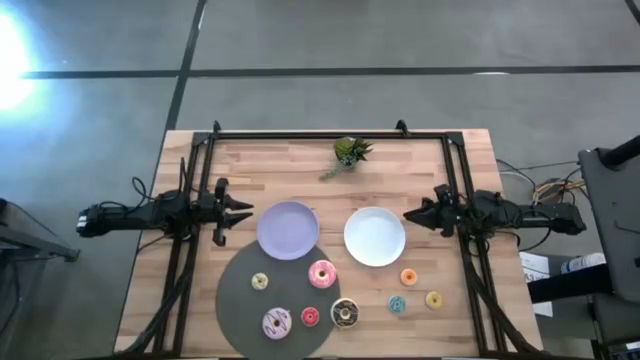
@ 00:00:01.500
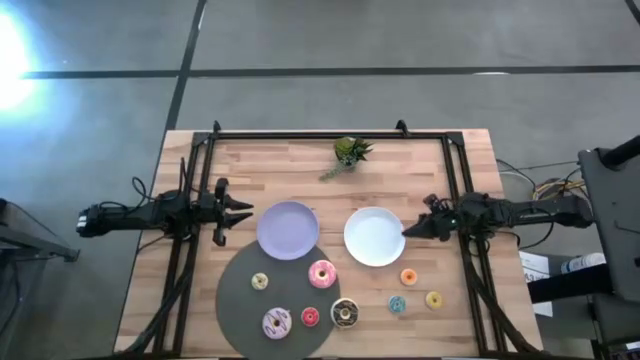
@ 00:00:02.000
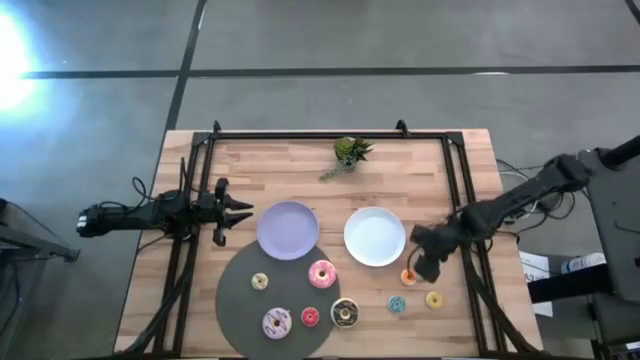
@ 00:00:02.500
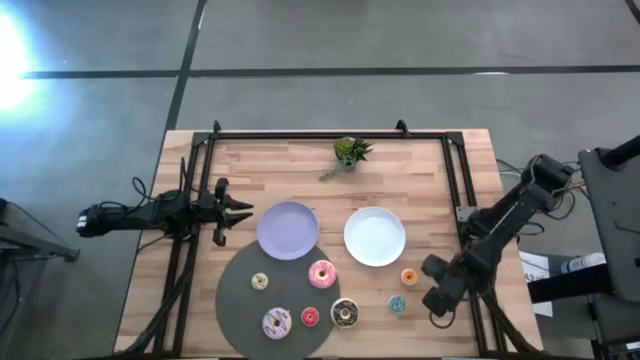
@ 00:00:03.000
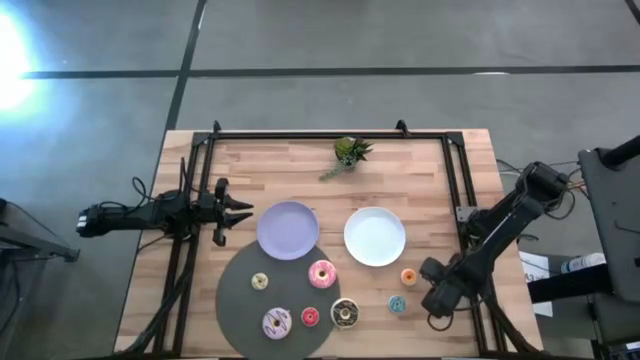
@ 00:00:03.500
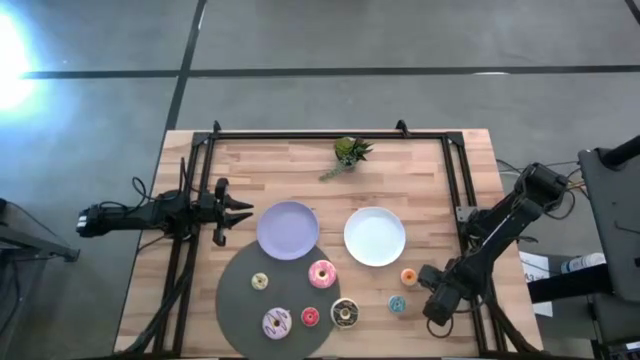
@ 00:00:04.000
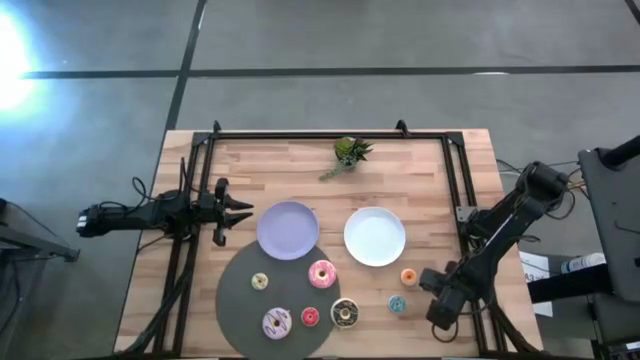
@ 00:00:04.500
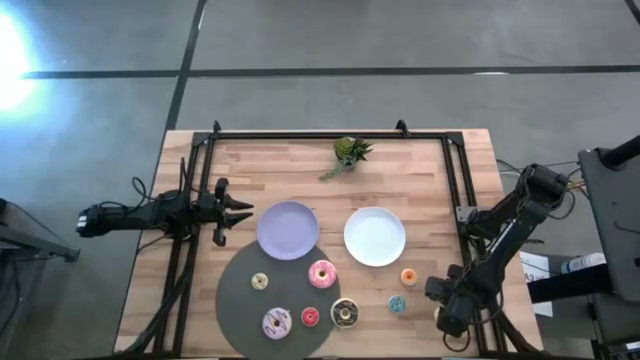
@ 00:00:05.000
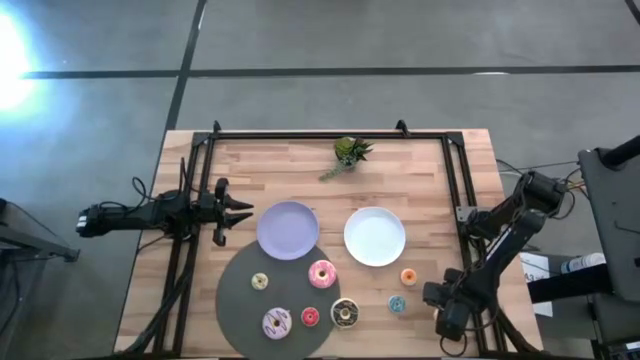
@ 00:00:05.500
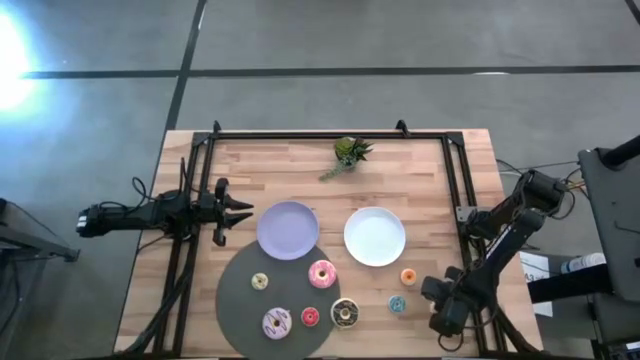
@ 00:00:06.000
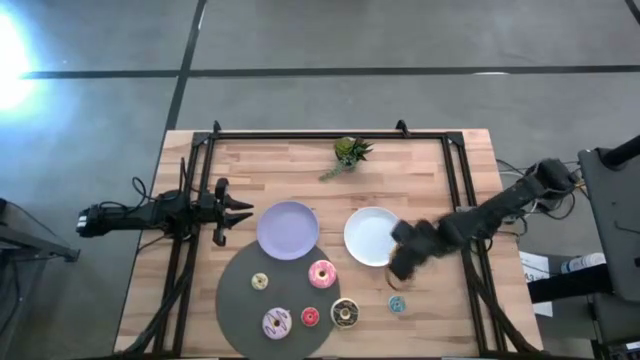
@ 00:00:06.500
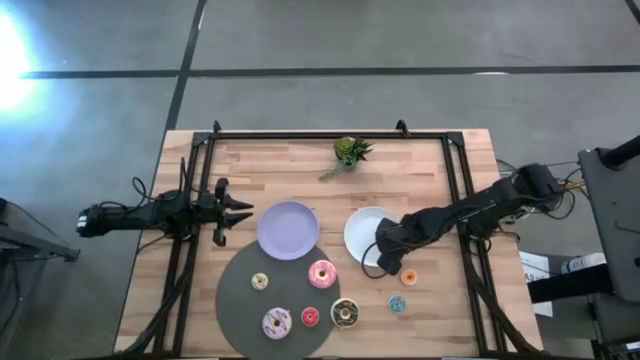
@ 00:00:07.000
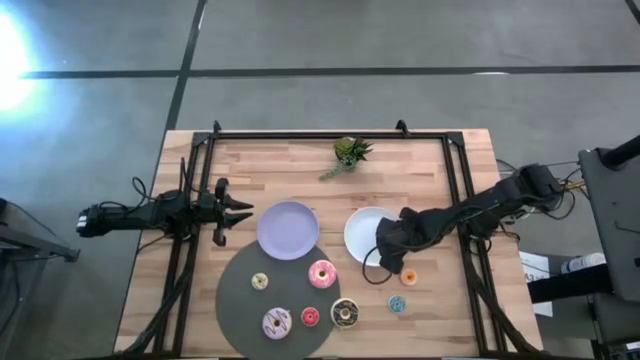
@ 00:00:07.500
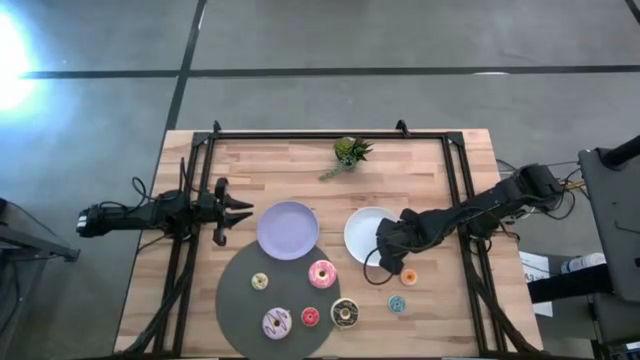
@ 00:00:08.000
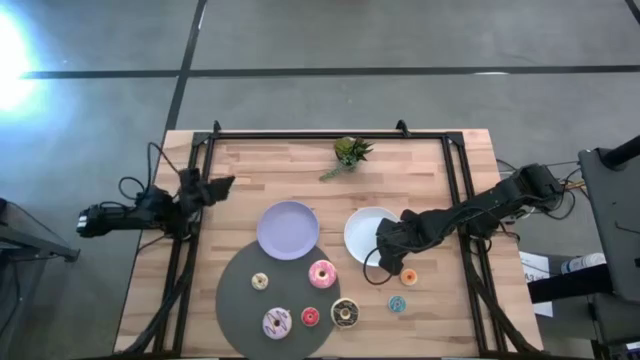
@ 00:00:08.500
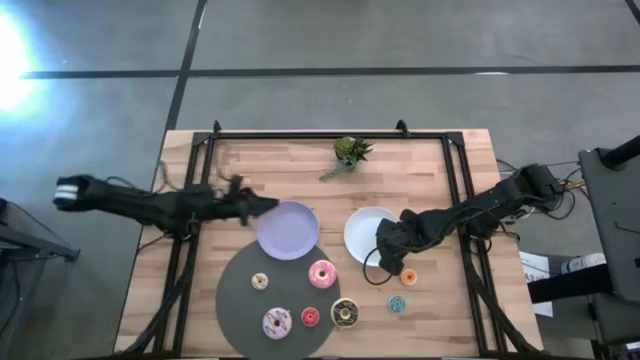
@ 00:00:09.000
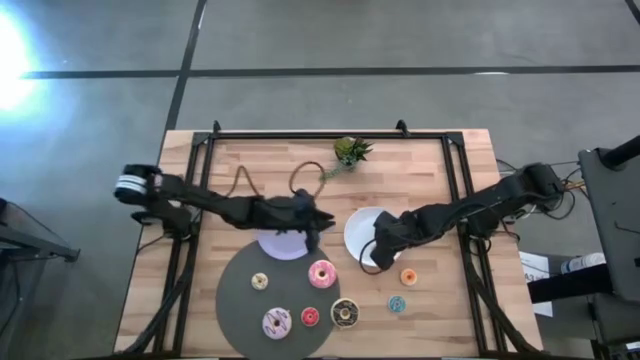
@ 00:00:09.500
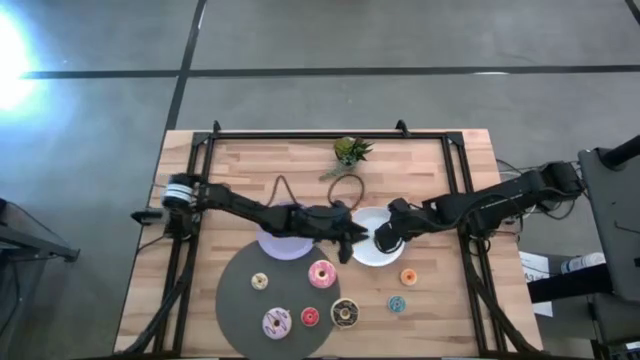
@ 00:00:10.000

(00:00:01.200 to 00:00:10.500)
Task: Pick & Place donuts
Put the small yellow donut on the white plate

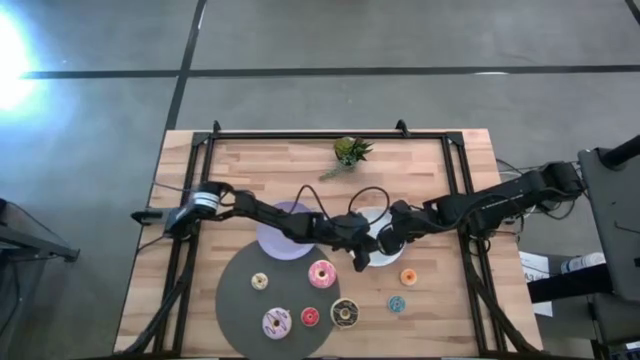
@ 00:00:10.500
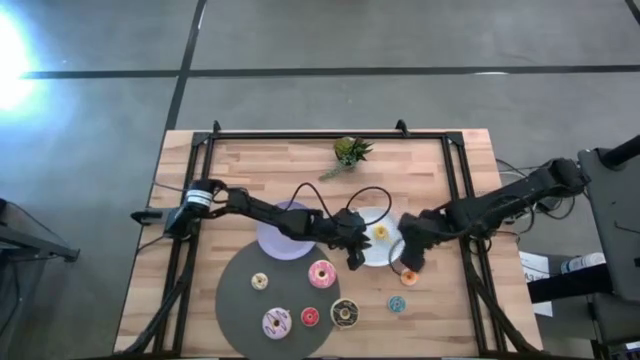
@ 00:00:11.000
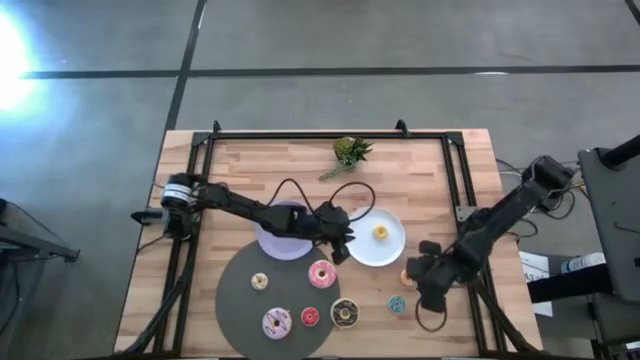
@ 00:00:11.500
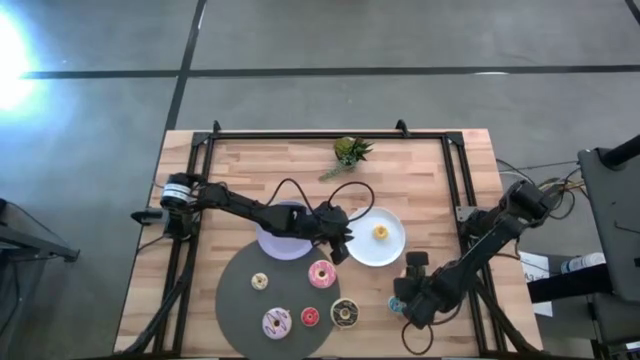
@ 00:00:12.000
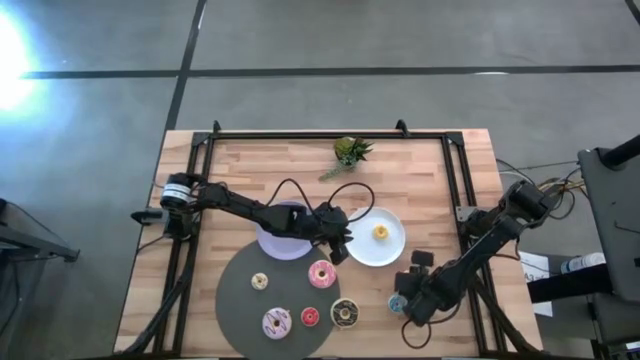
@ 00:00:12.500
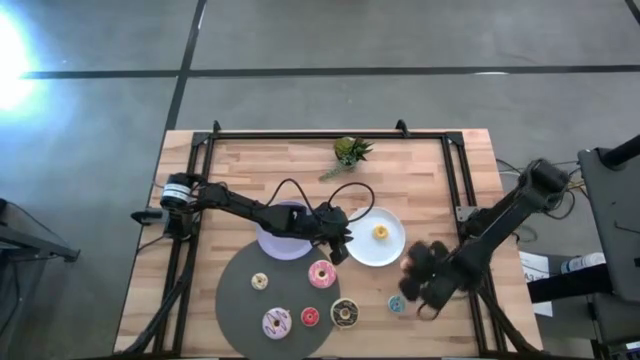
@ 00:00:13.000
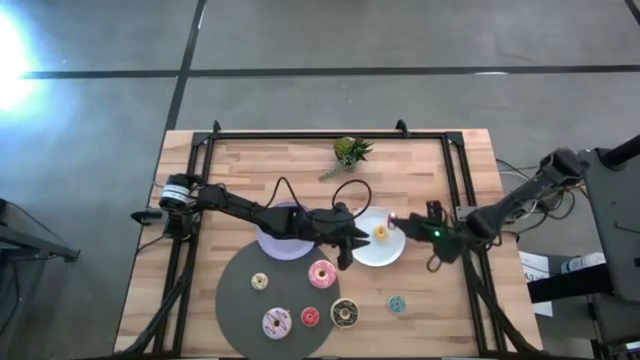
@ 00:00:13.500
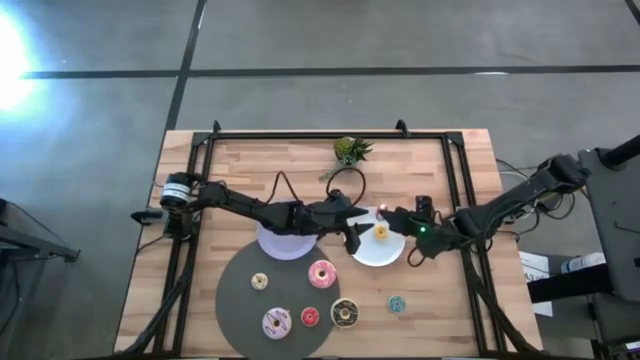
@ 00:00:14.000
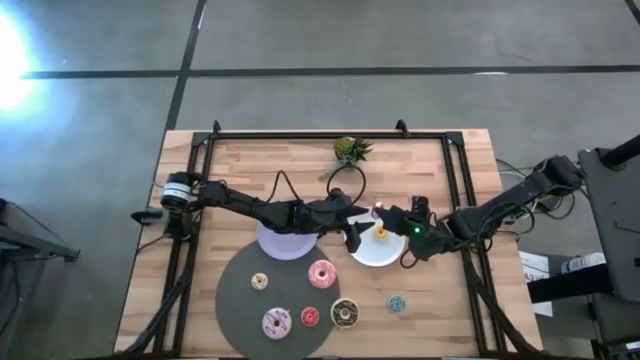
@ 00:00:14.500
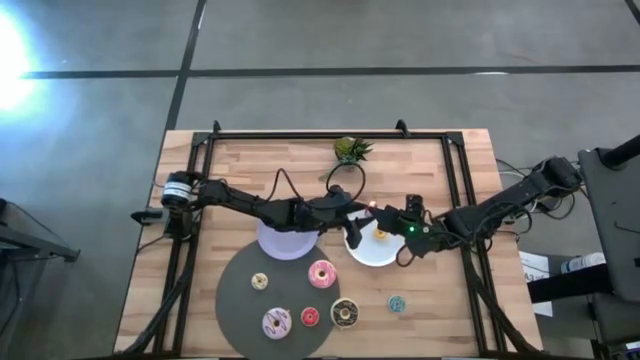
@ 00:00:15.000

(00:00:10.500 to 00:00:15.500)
Put the small red donut on the white plate

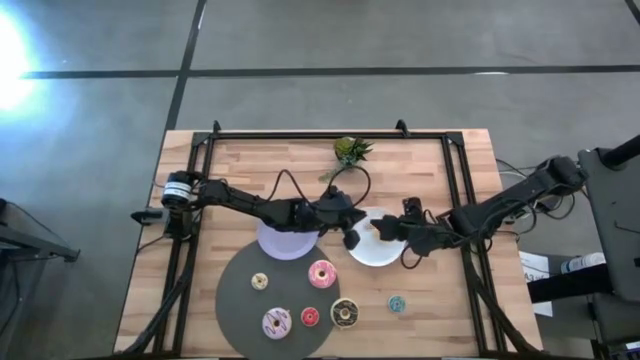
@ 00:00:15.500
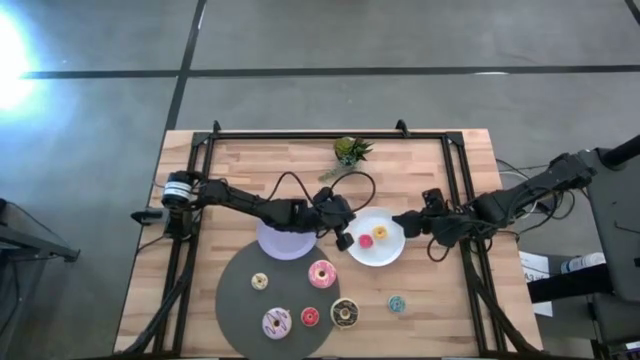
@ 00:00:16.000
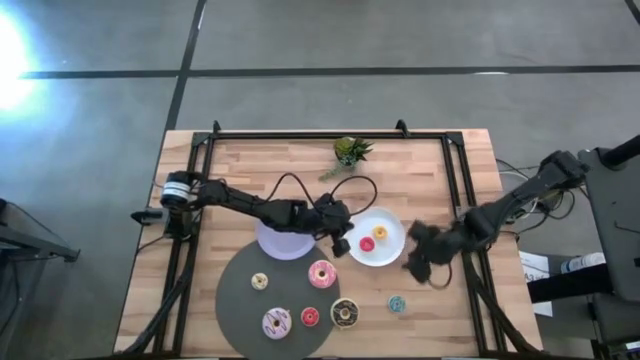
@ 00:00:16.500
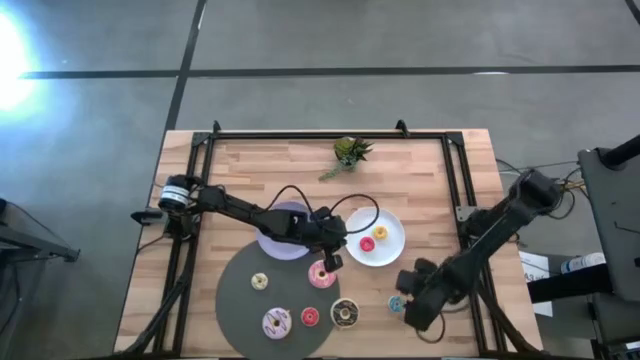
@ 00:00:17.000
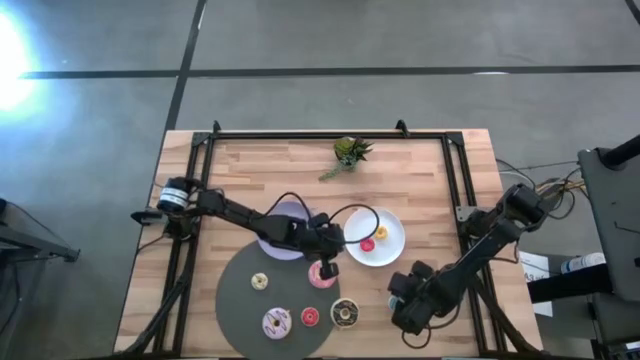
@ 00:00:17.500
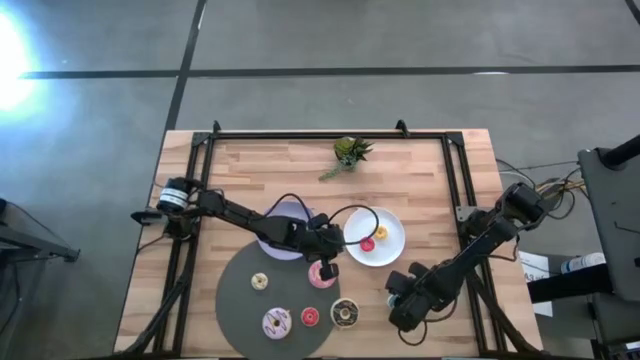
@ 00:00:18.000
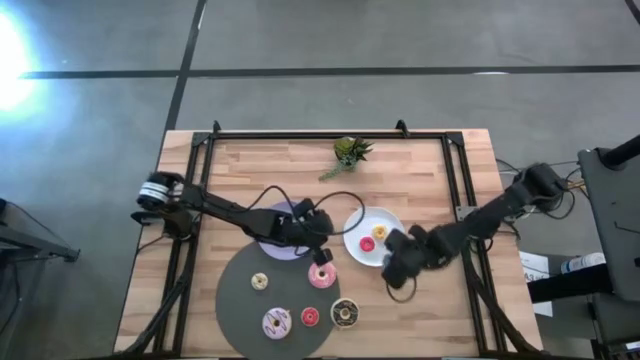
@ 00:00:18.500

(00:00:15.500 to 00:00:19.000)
Put the small blue donut on the white plate

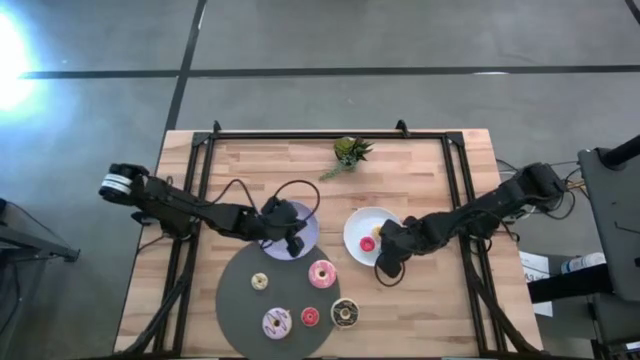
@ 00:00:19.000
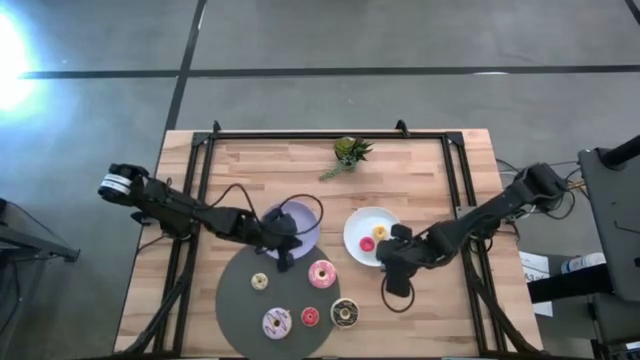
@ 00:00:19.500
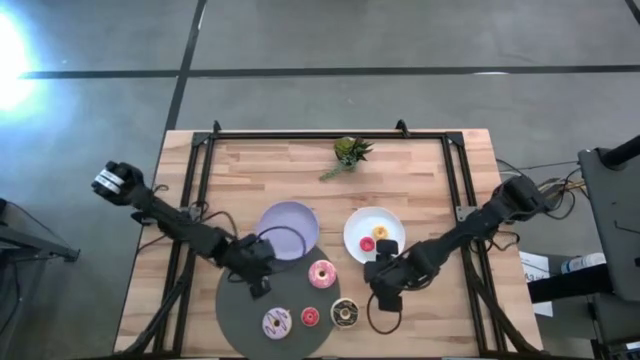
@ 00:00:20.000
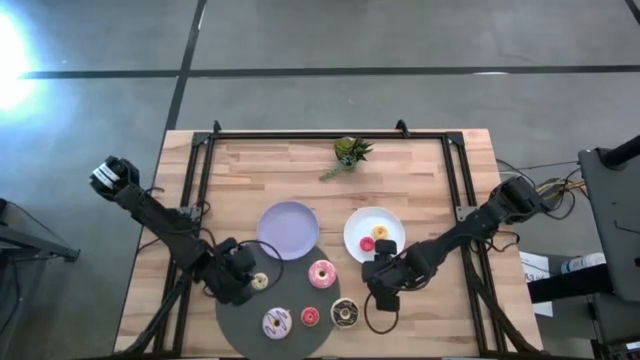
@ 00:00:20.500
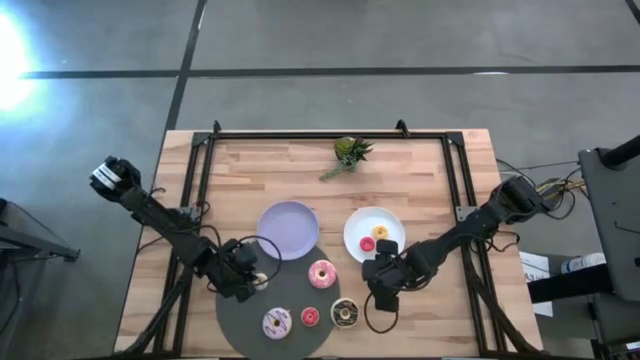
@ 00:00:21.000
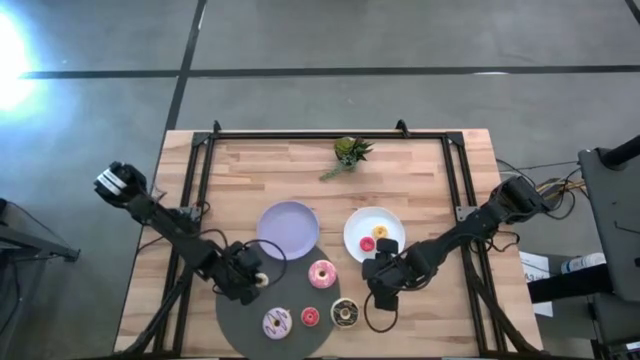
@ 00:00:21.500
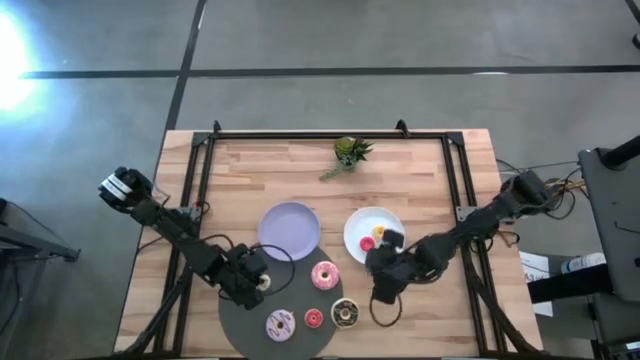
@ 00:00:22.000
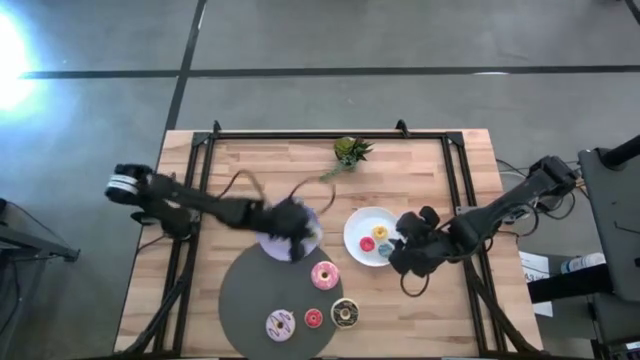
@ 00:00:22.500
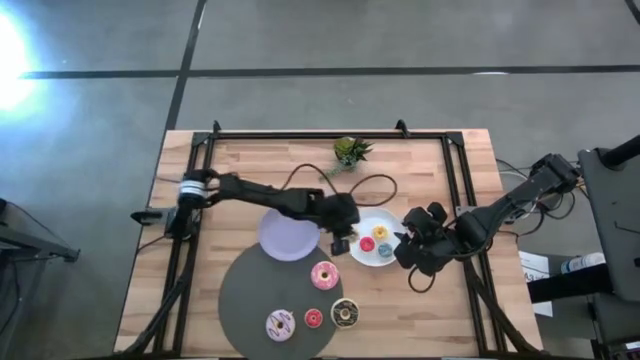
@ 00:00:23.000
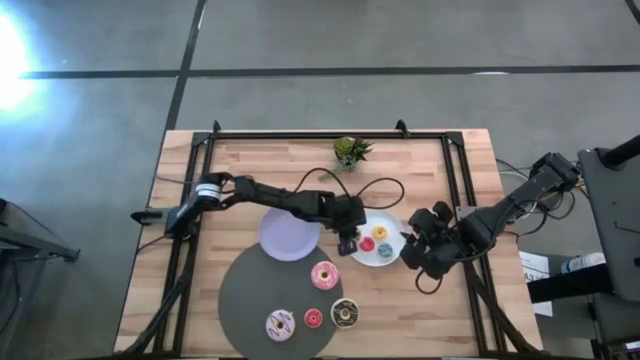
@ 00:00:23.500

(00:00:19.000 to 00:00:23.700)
Put the small white donut on the white plate
